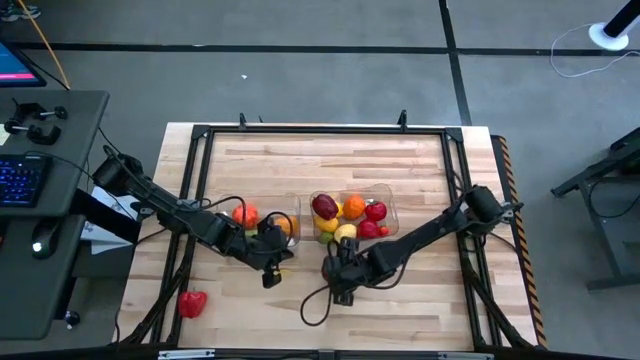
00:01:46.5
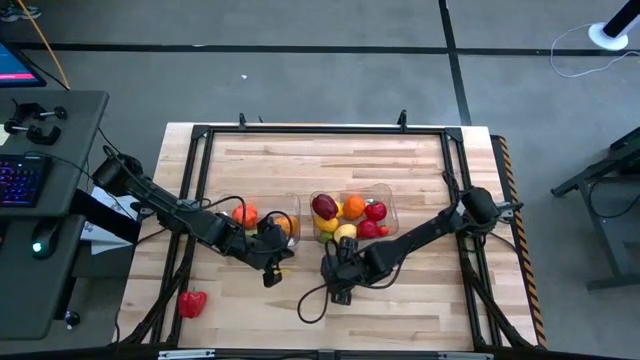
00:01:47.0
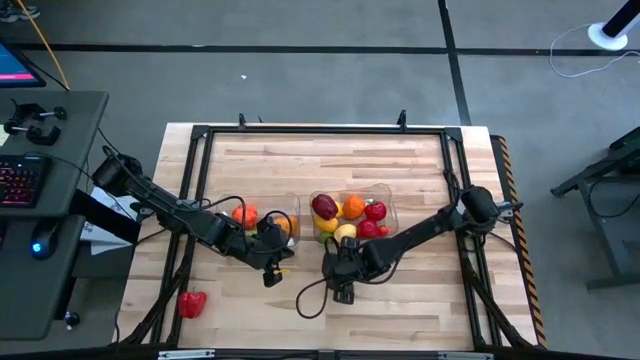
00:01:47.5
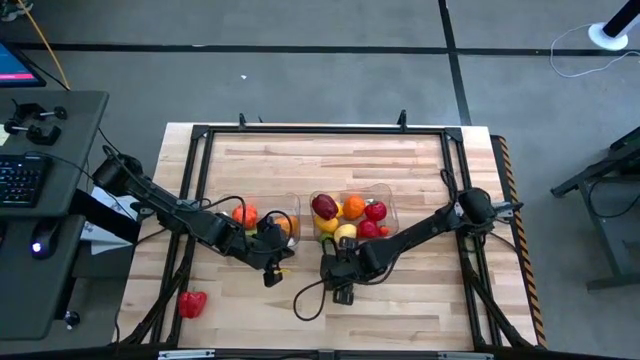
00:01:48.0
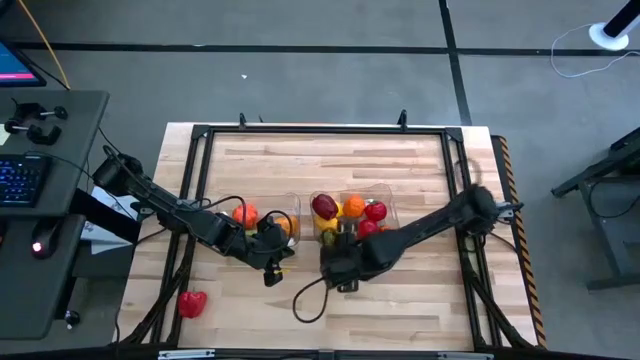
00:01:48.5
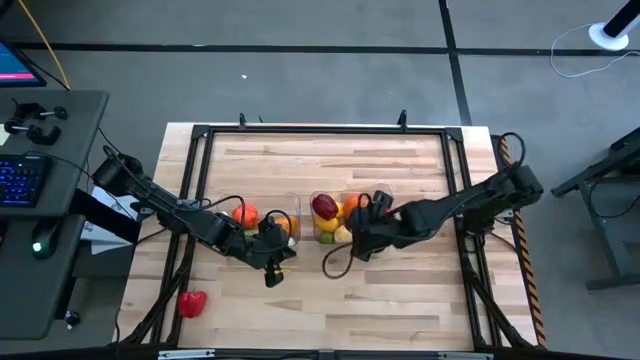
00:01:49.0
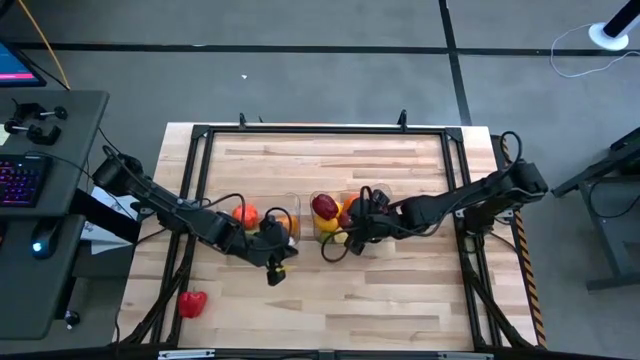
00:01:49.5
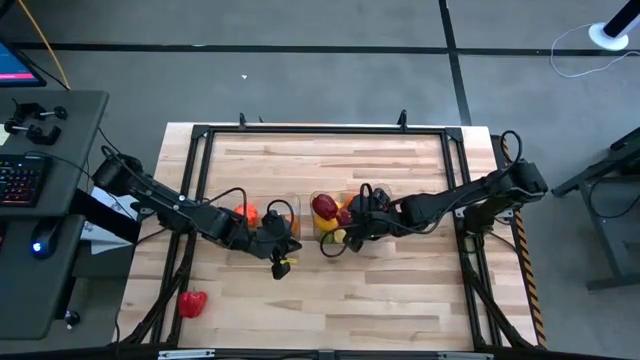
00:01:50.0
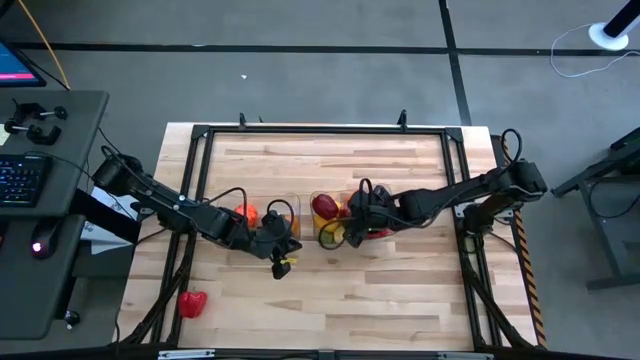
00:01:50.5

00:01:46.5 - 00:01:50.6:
Task: Sort produce into baskets
Put the red apple into the right transparent bin

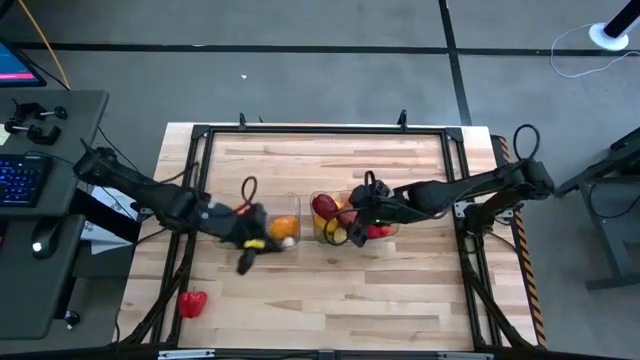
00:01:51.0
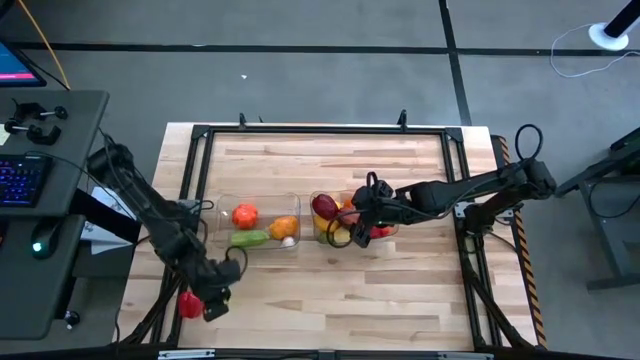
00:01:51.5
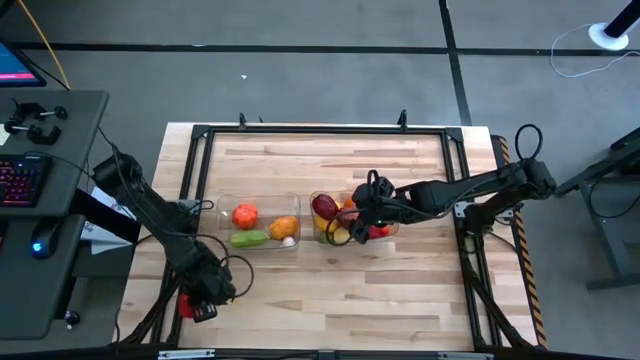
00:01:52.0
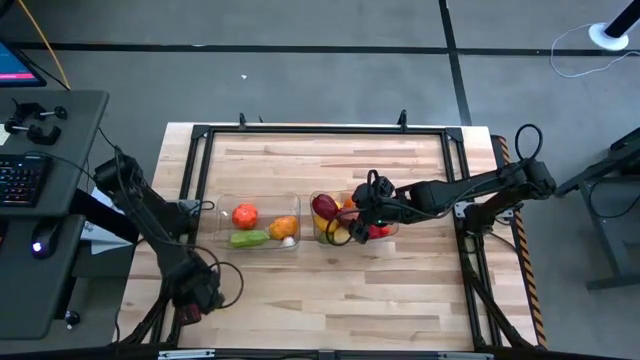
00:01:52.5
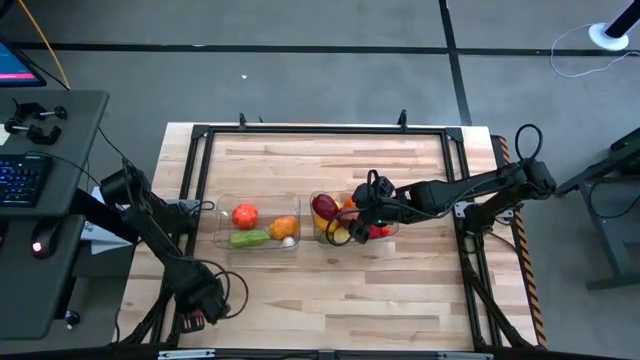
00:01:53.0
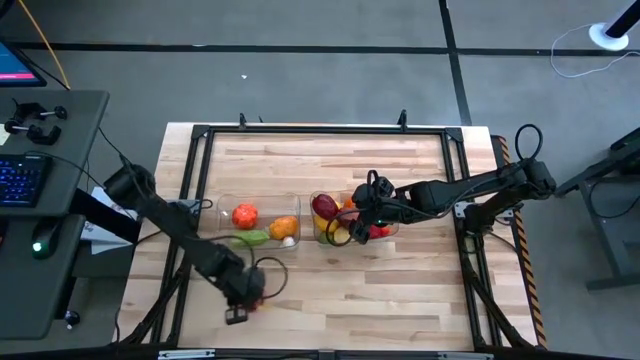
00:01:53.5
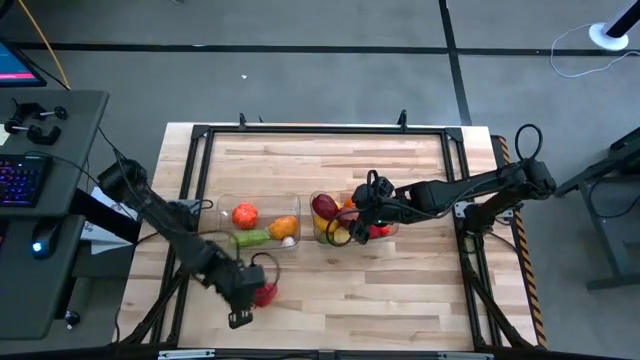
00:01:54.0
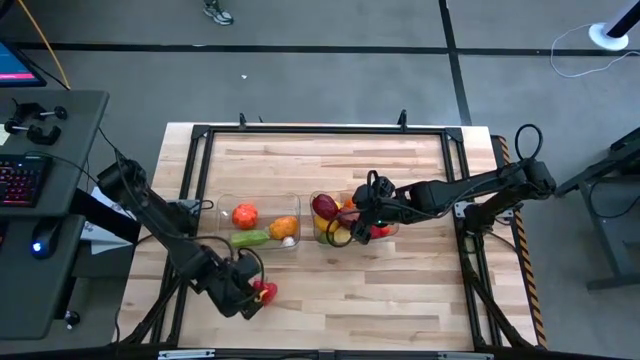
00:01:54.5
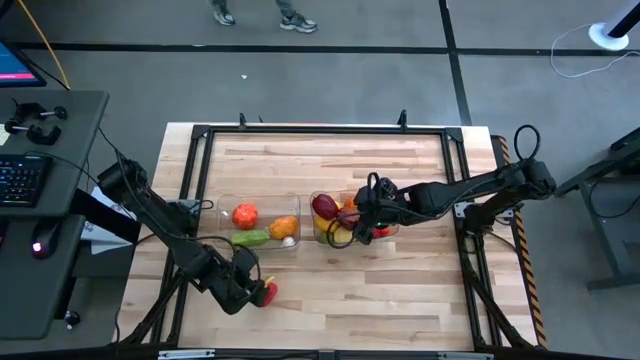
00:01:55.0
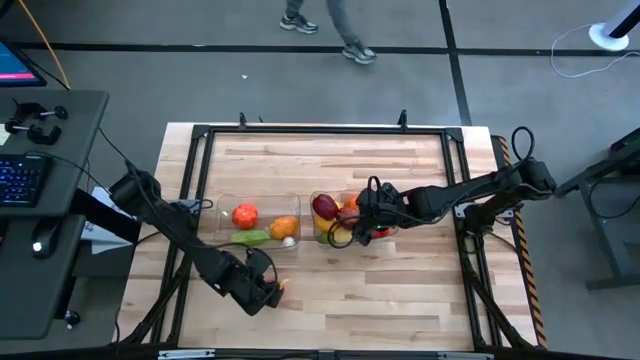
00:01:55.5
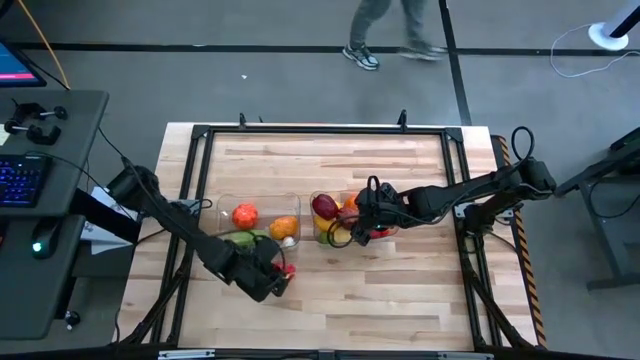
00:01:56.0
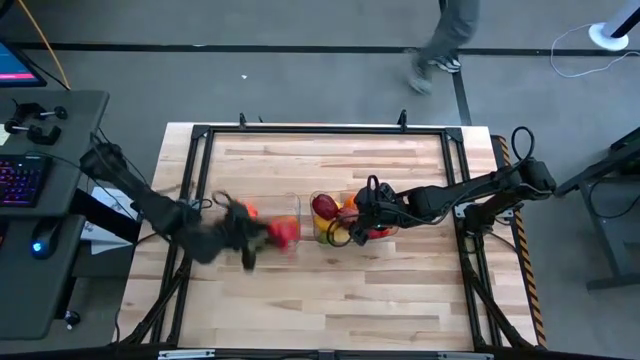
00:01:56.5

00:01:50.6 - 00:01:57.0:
Put the red bell pepper into the left transparent bin

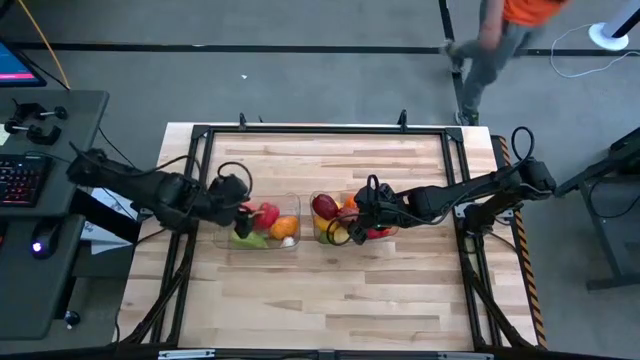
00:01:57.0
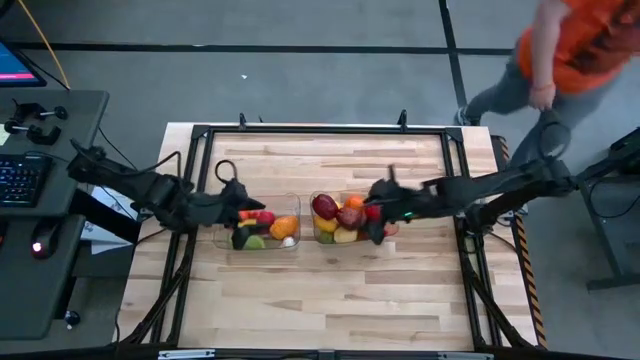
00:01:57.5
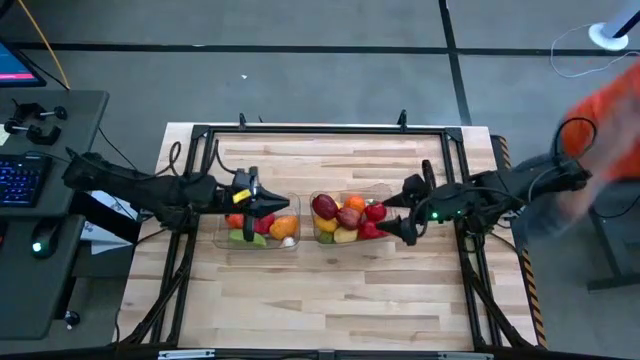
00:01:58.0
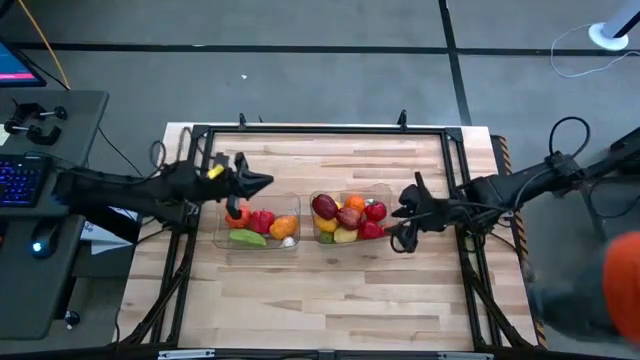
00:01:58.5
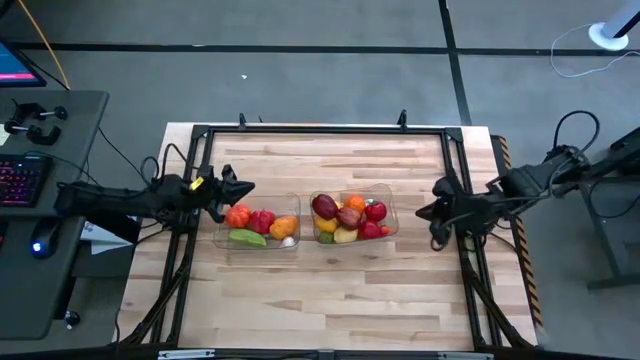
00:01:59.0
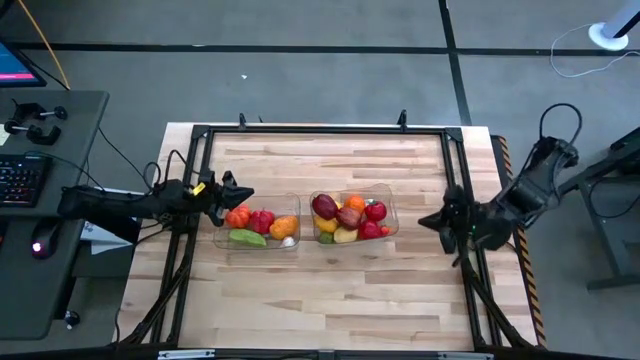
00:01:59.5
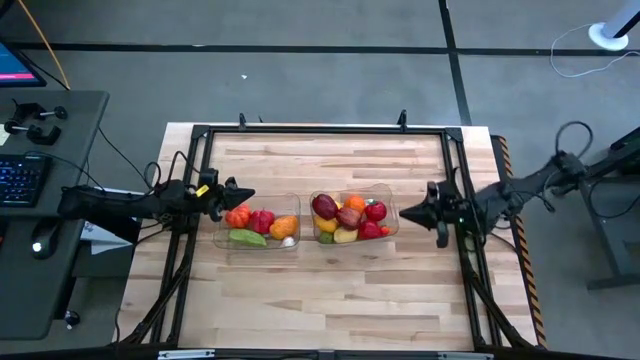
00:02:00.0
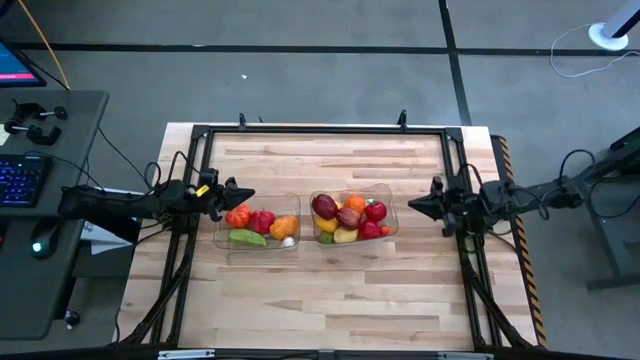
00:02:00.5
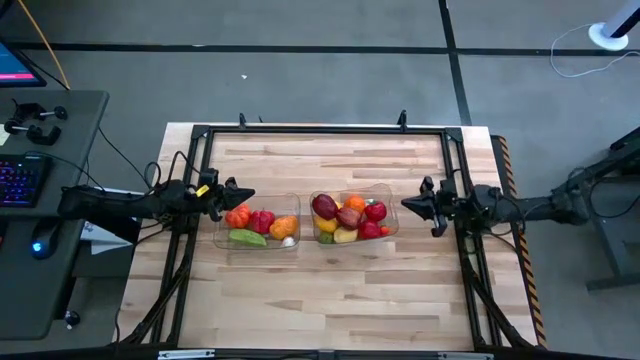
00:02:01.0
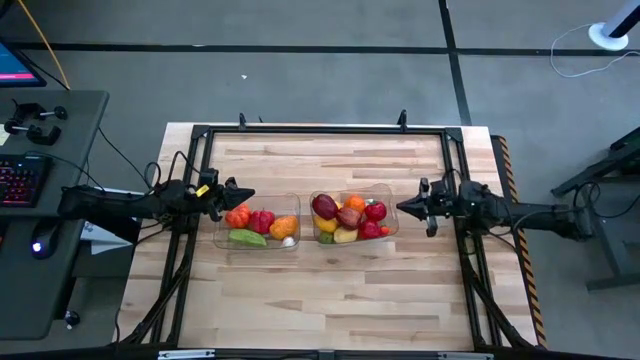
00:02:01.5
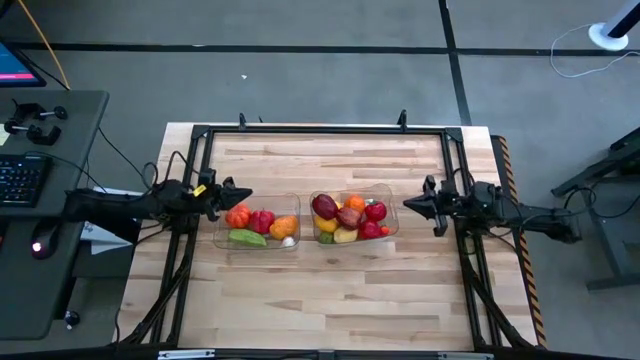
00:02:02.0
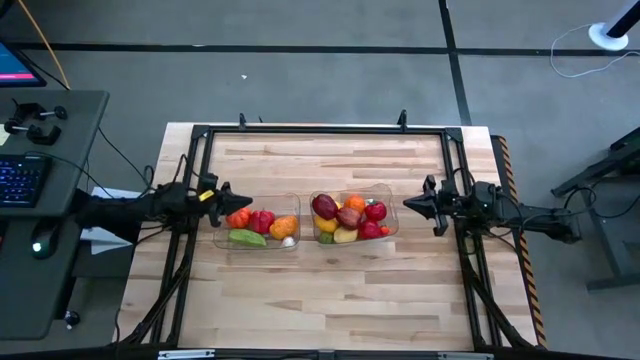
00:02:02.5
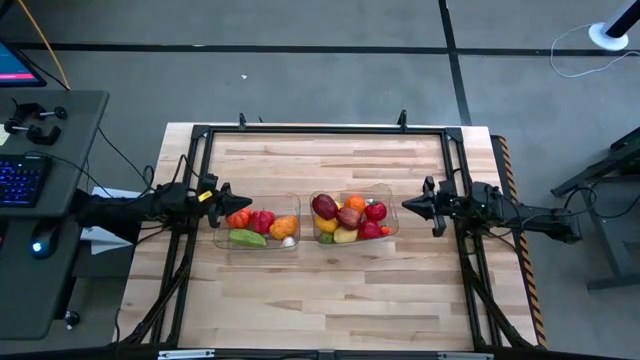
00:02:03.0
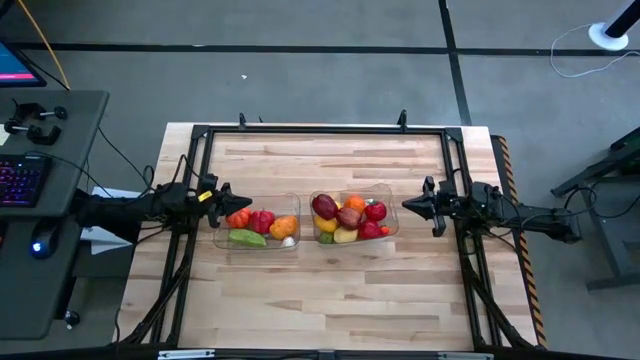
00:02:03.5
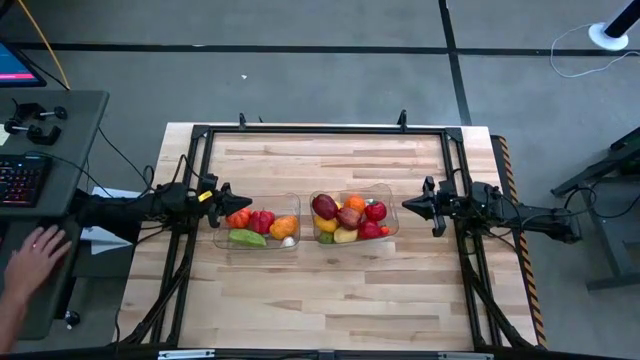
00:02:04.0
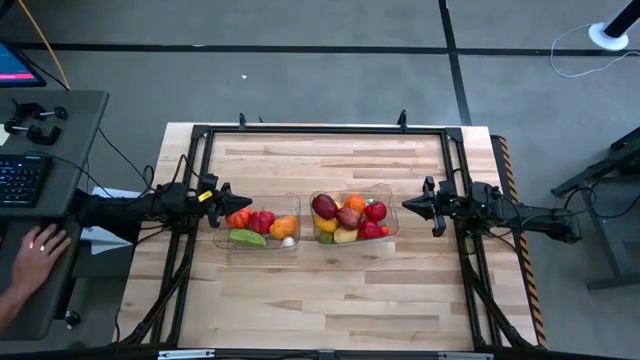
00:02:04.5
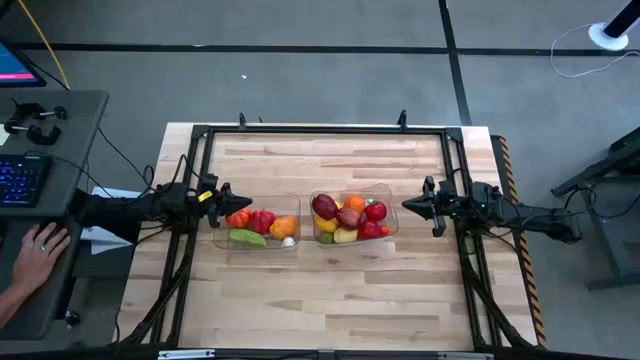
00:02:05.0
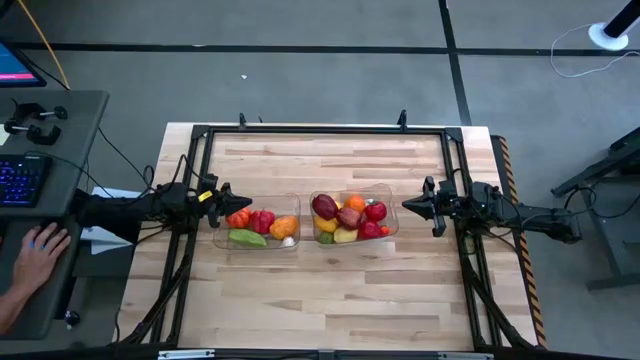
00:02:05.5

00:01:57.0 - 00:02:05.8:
Return to Home Position

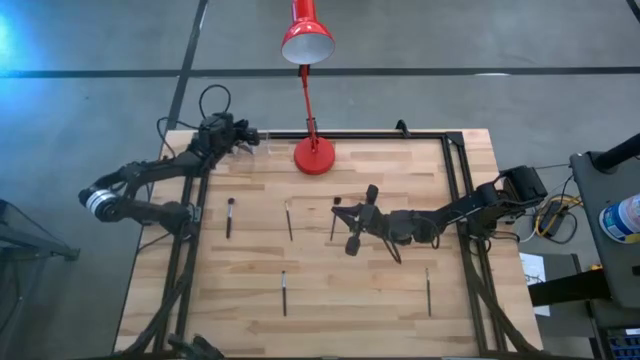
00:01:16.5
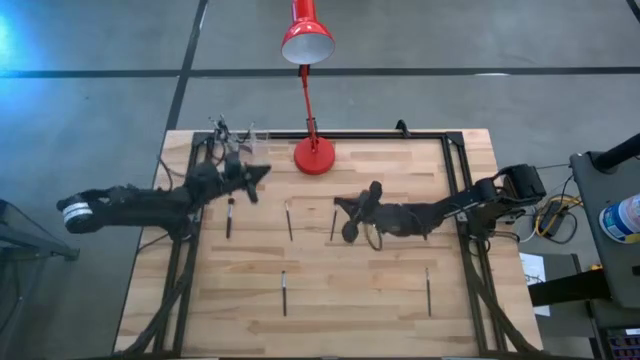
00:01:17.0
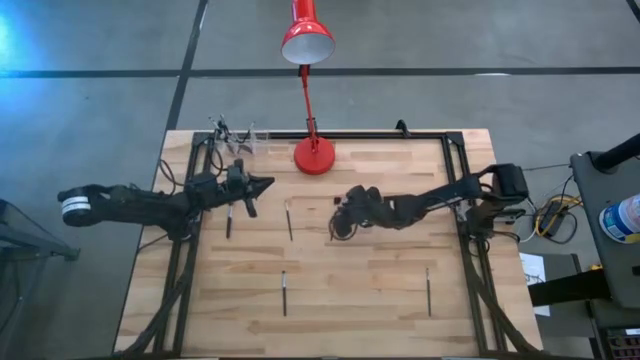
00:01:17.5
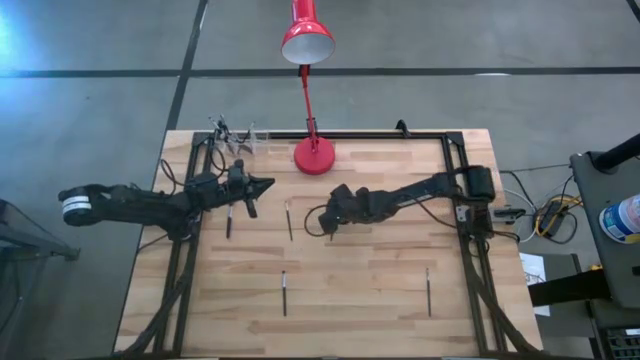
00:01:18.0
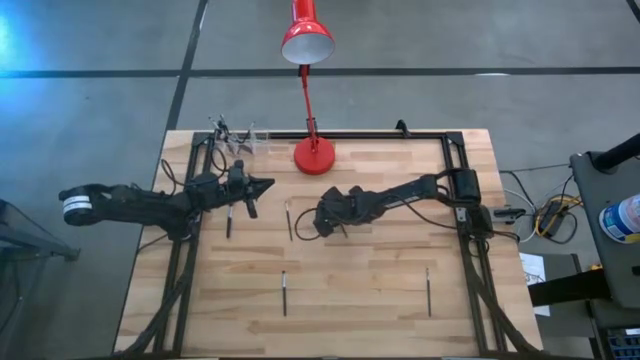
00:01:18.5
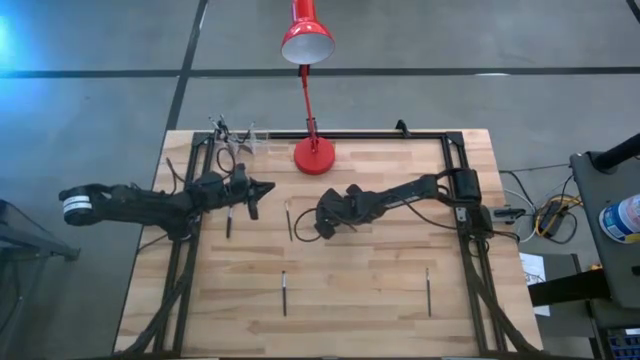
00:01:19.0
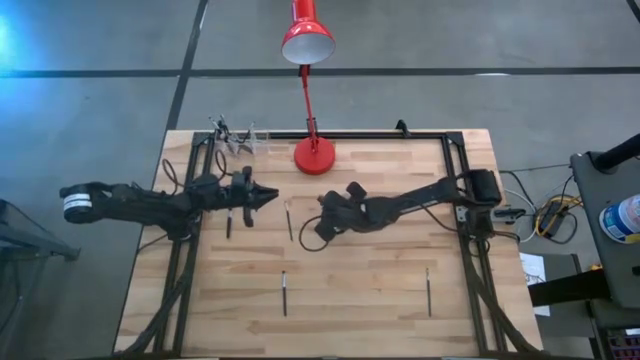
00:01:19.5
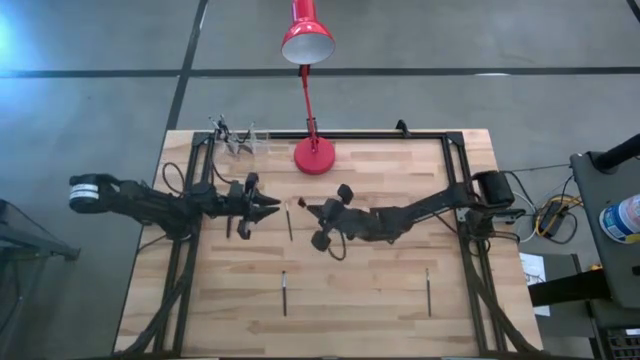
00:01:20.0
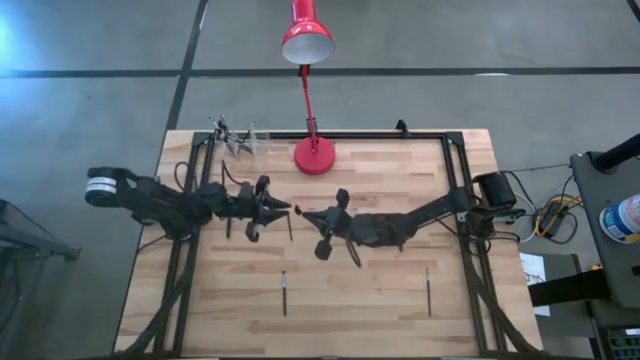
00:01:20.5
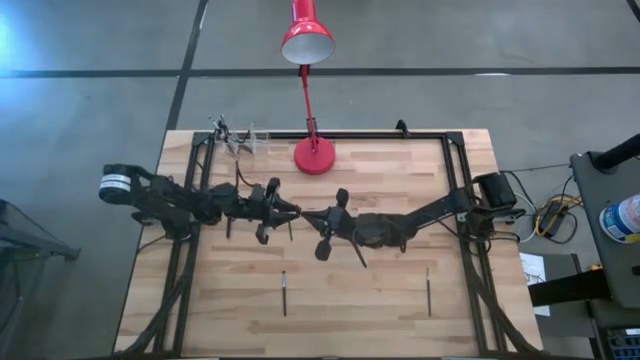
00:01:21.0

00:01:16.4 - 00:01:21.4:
Task: Pick & Place Makeup Supplies
Put the makeup brush into the transparent organizer
